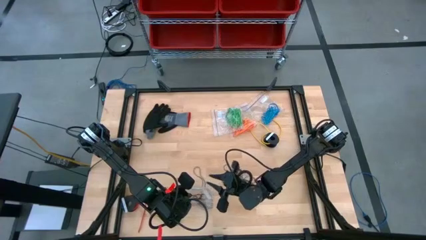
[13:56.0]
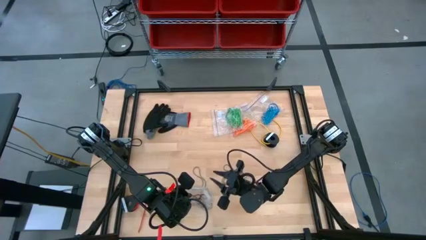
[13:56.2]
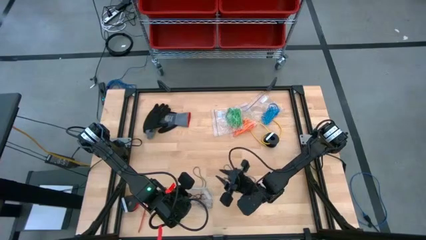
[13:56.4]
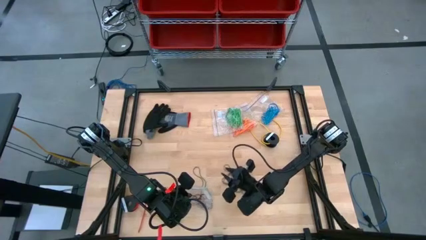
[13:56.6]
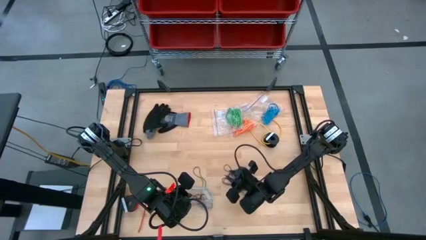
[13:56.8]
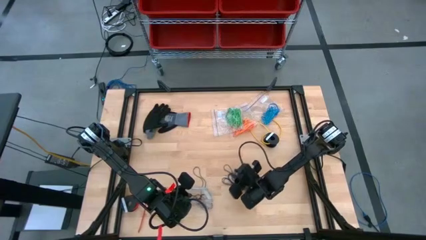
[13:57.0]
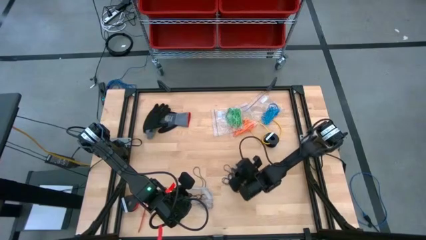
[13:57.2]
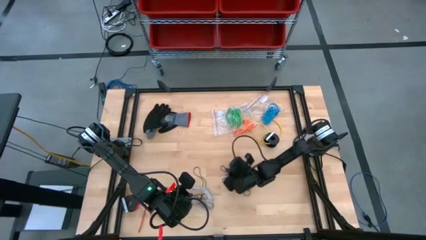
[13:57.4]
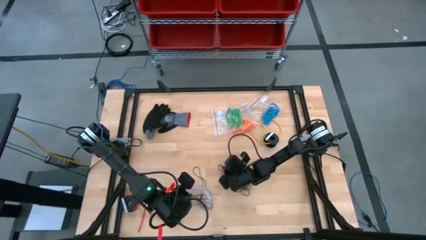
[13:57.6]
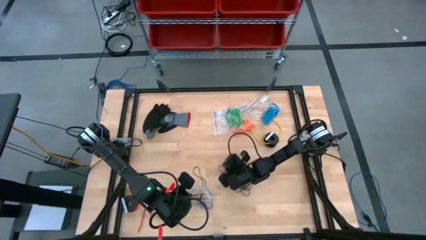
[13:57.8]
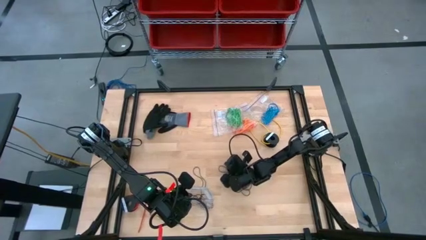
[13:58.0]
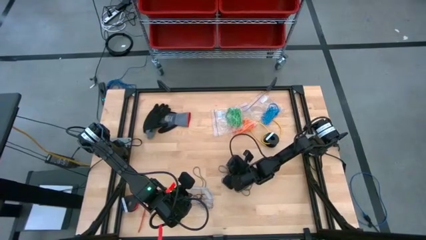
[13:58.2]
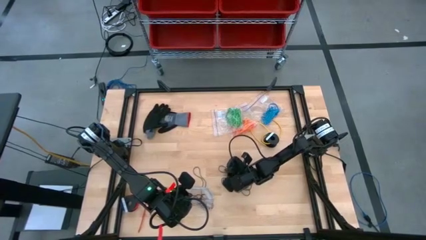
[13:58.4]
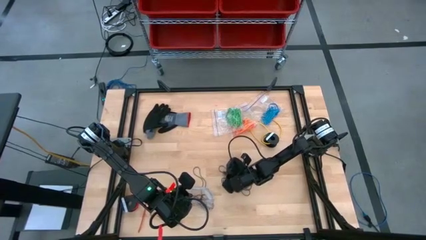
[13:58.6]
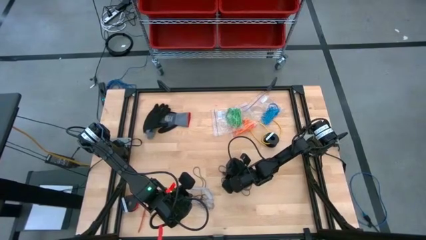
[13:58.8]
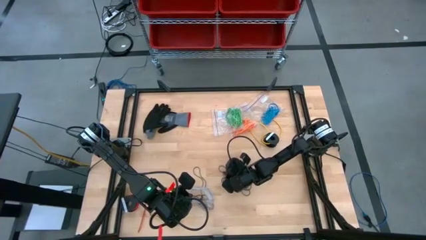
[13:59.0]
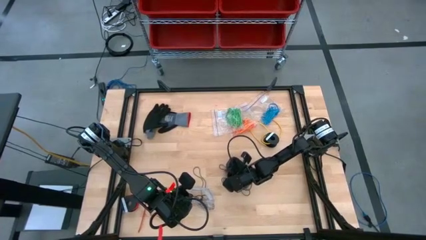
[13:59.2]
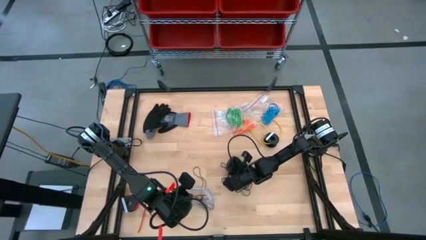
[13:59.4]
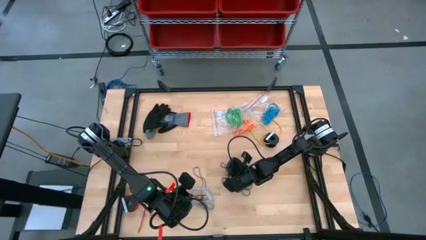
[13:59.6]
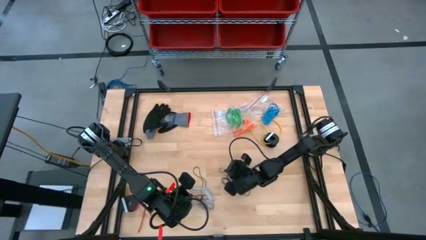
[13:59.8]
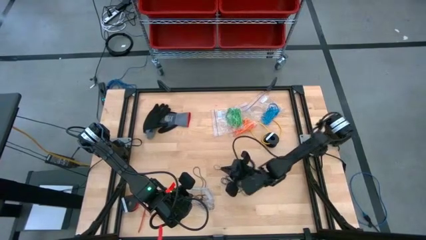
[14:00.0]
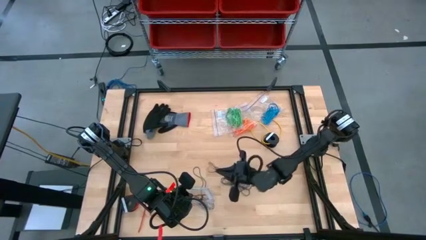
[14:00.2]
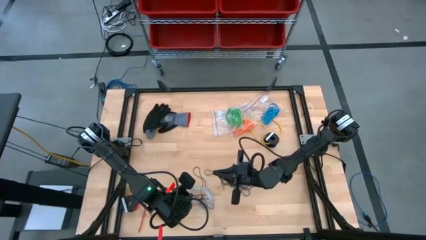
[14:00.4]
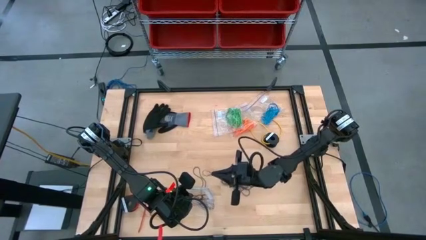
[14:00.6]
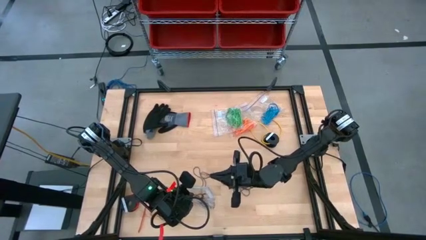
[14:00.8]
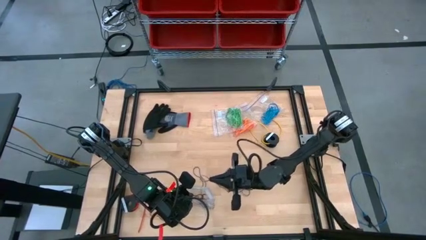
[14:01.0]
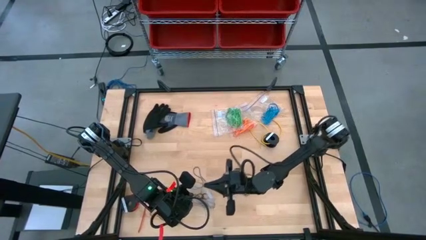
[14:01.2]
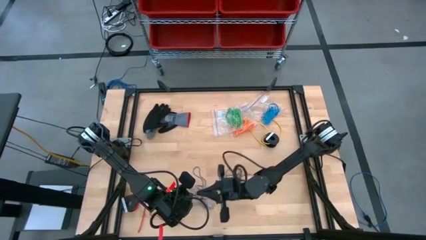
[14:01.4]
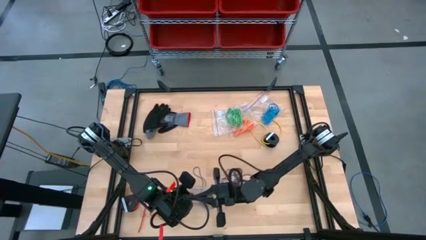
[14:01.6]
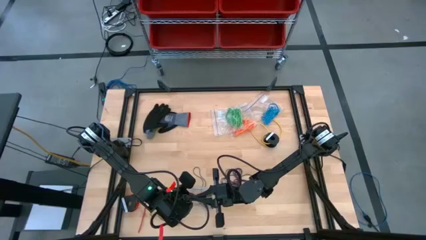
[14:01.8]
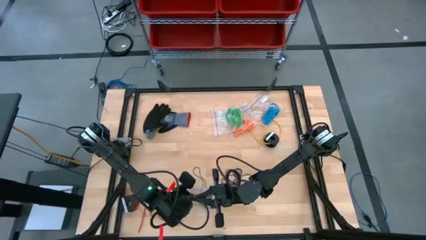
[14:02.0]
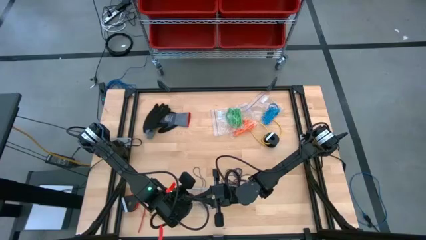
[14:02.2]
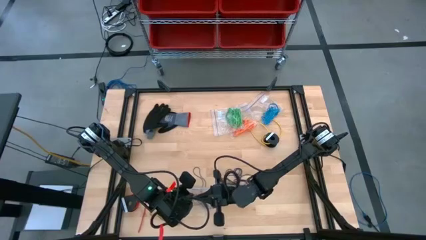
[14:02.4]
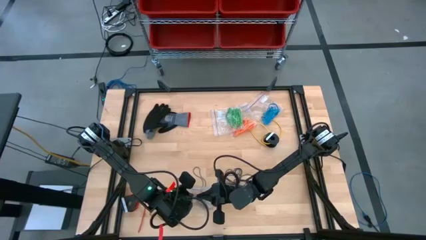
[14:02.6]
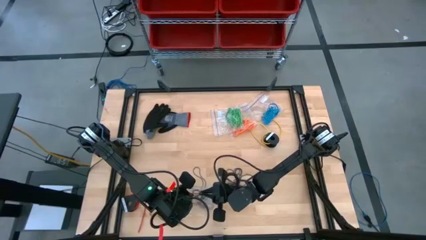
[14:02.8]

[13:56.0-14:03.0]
Task: Sort rubber bands
Put the black rubber band into the transparent zip bag

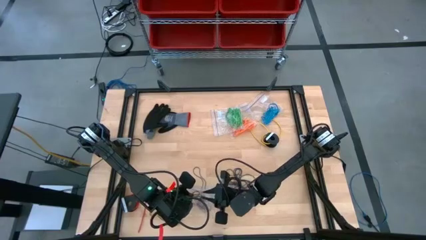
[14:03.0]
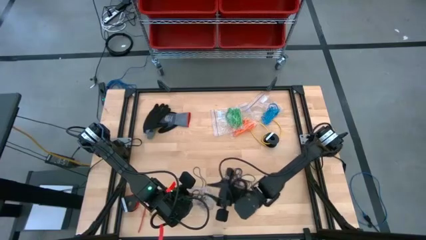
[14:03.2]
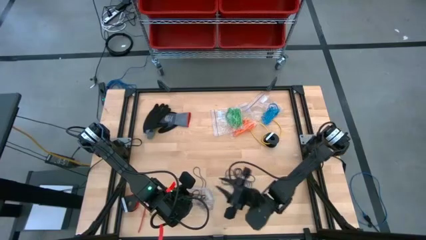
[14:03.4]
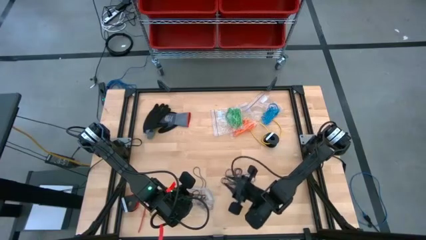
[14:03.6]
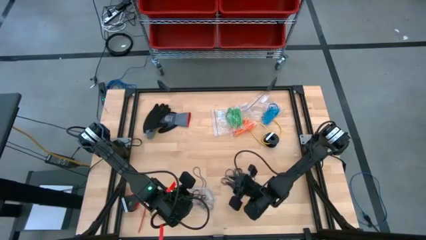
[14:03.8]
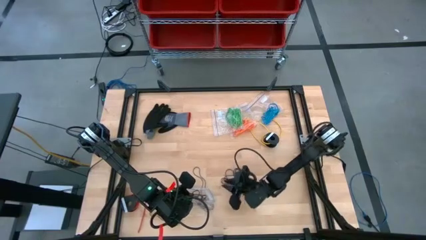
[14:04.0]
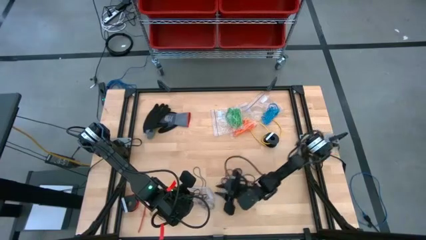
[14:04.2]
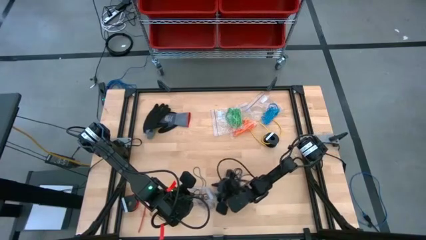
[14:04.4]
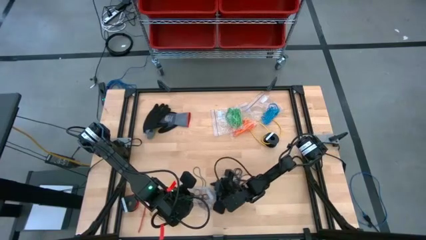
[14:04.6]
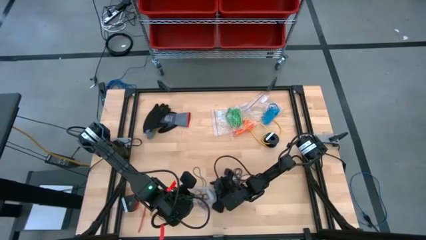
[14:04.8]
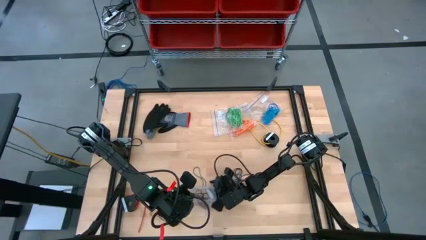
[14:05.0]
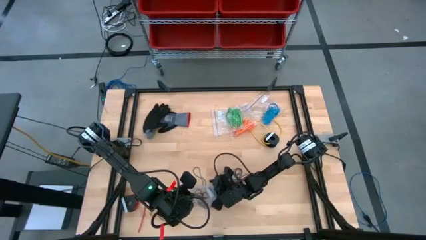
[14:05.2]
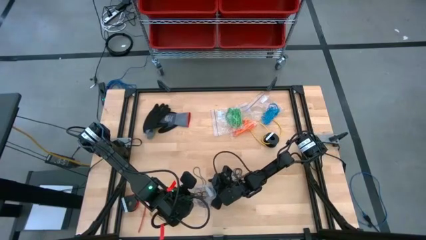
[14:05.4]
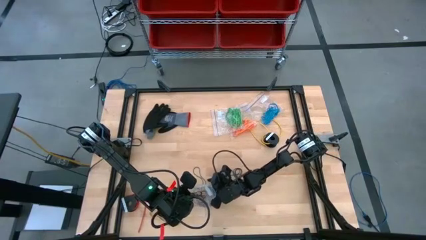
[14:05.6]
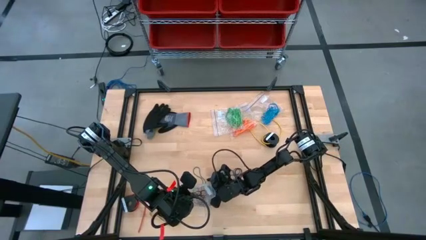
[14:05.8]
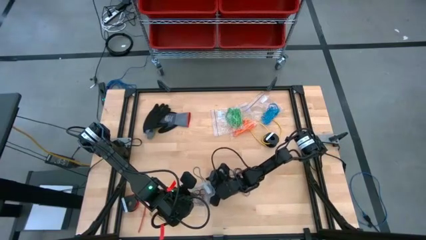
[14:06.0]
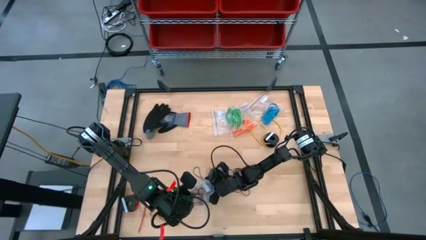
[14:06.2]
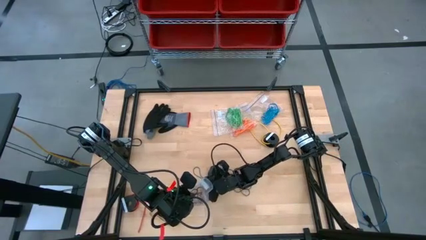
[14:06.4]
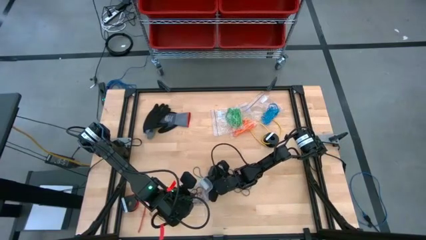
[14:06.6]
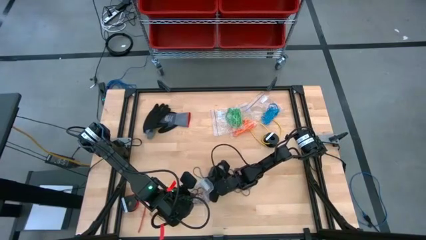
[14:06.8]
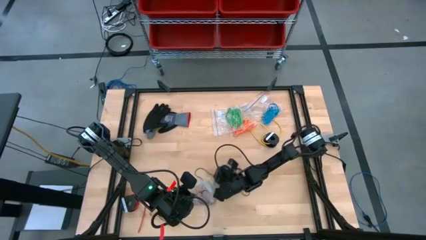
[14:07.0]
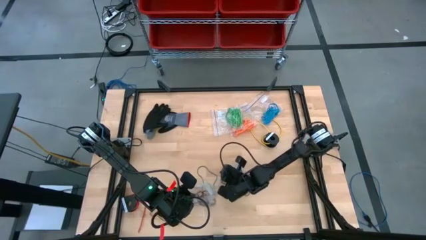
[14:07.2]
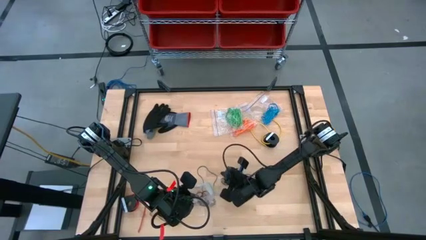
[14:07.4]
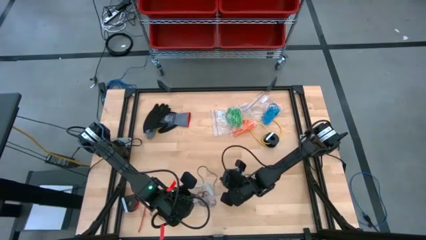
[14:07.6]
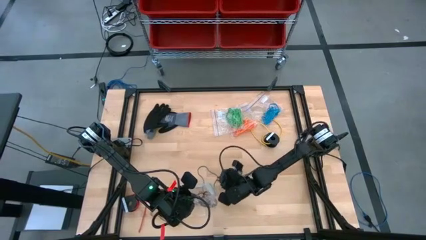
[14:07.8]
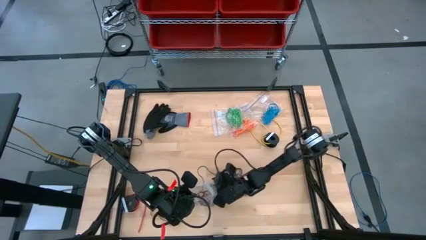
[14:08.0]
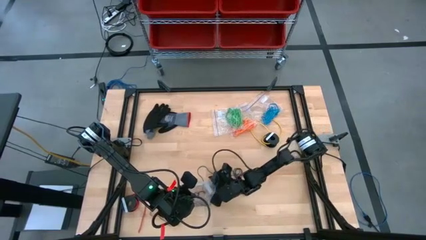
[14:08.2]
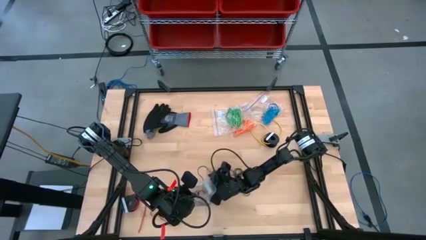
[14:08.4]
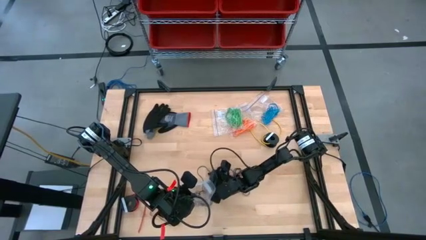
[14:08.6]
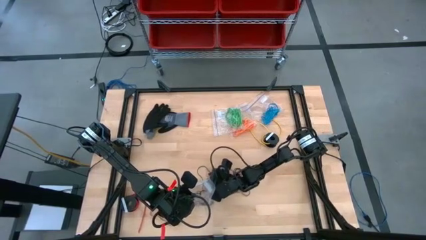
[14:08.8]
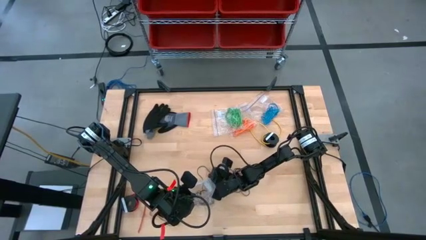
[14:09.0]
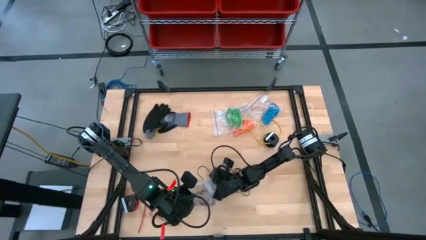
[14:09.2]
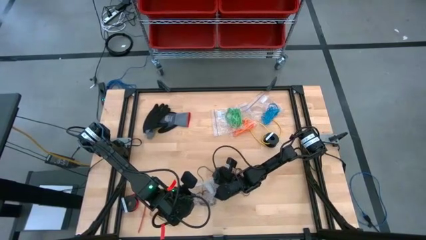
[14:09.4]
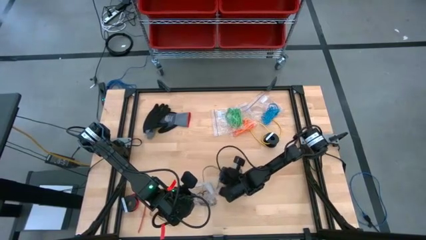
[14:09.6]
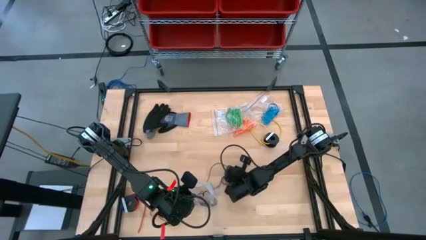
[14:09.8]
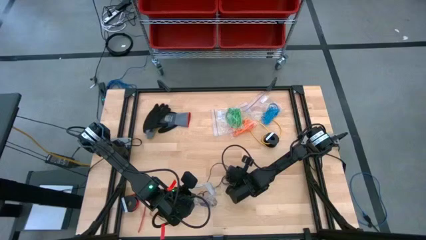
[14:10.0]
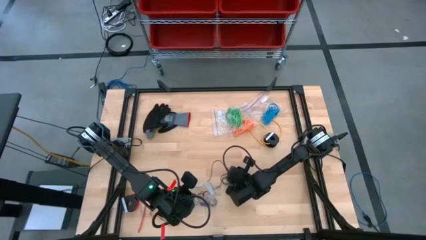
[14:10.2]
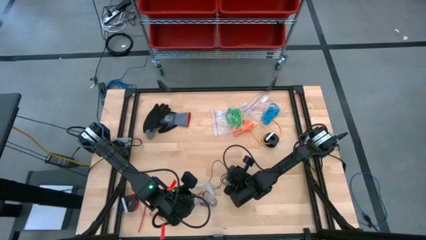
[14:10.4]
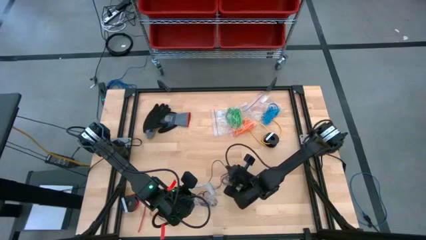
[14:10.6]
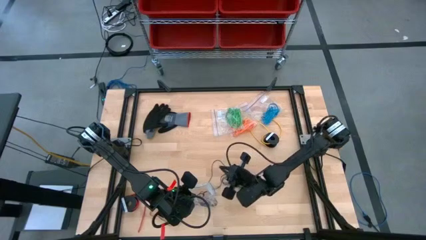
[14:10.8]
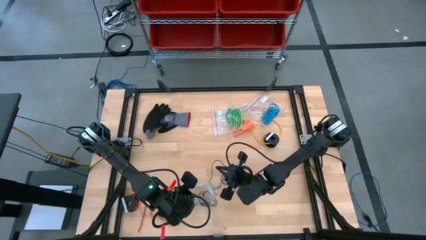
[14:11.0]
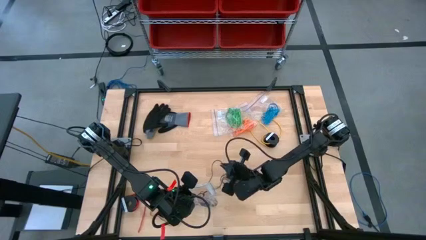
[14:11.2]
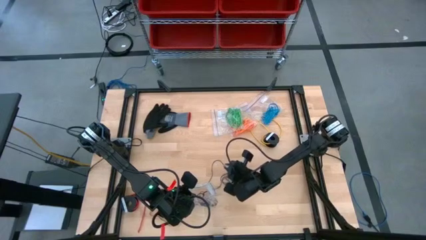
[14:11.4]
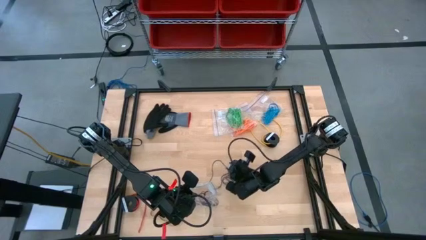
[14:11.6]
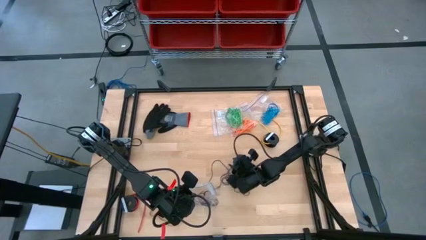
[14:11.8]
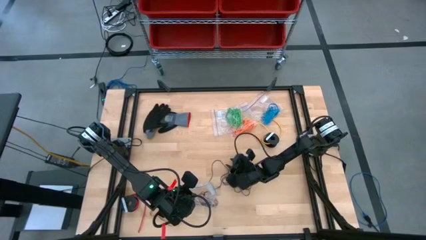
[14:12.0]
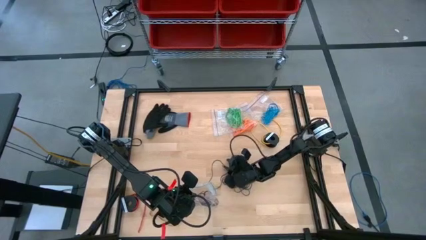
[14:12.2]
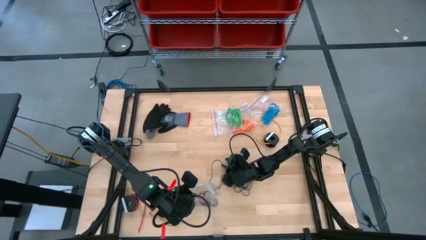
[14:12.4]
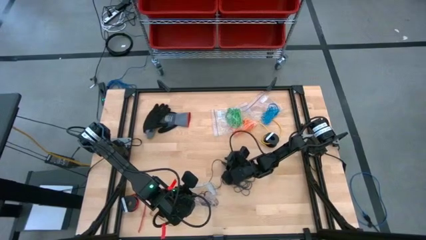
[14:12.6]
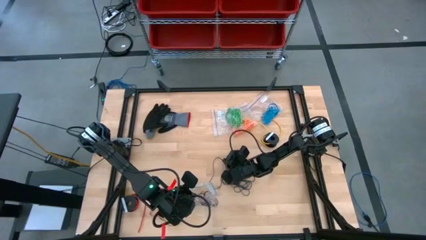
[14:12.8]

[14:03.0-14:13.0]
Put the black rubber band into the transparent zip bag
